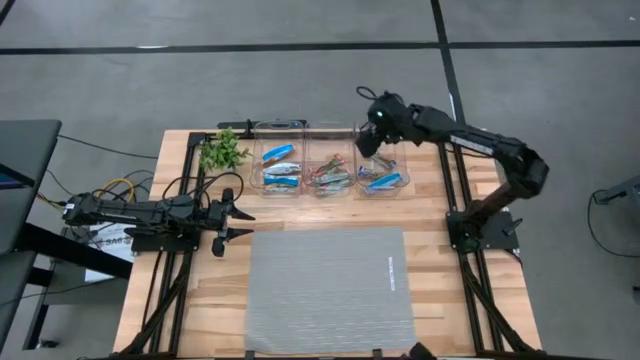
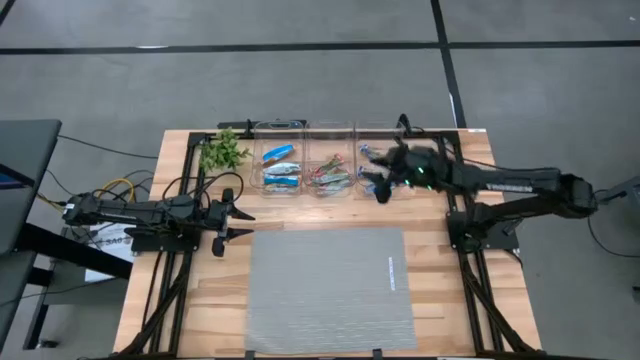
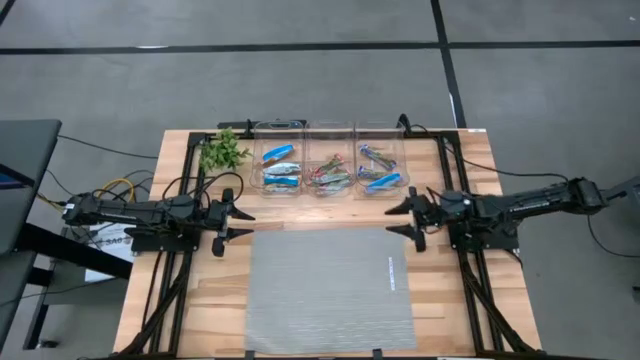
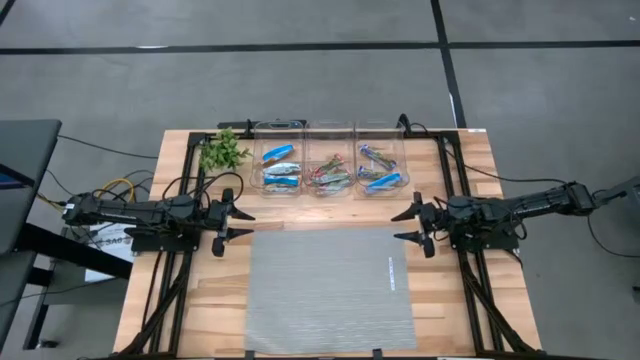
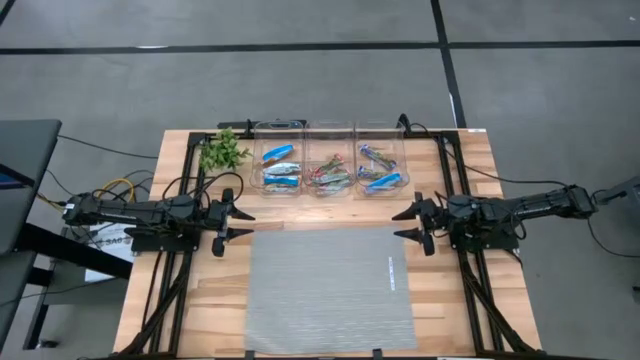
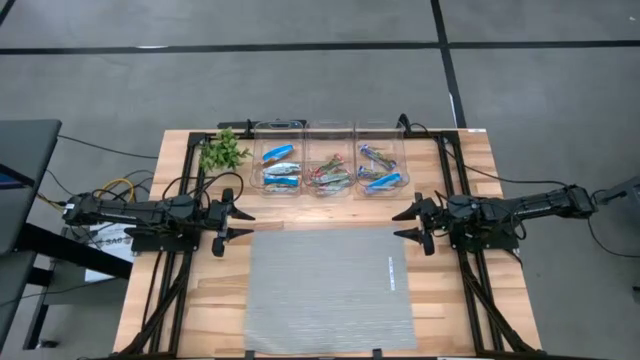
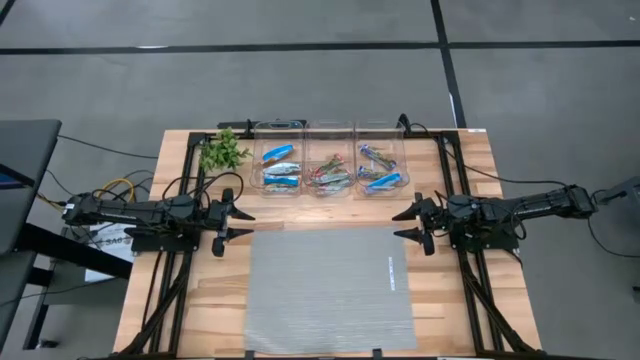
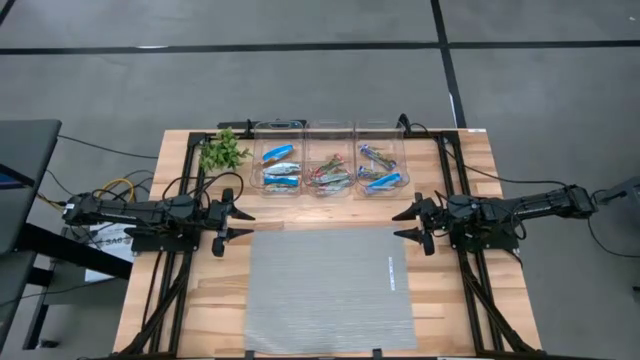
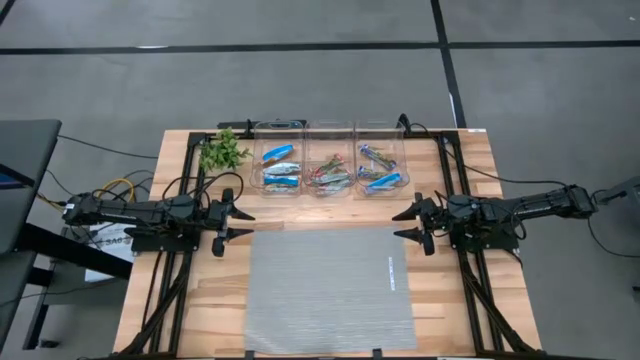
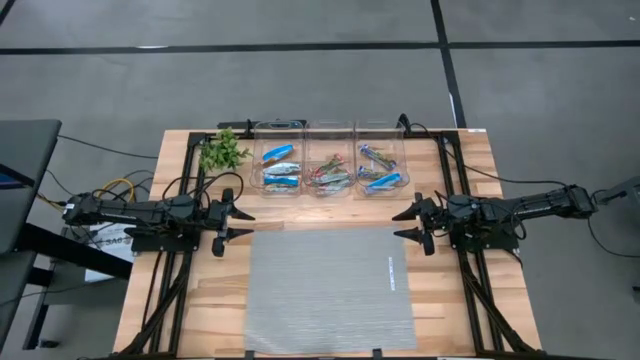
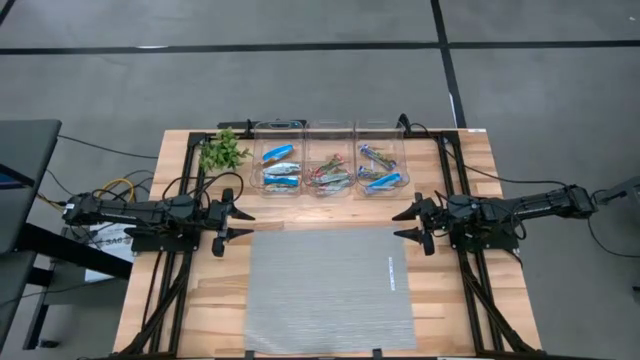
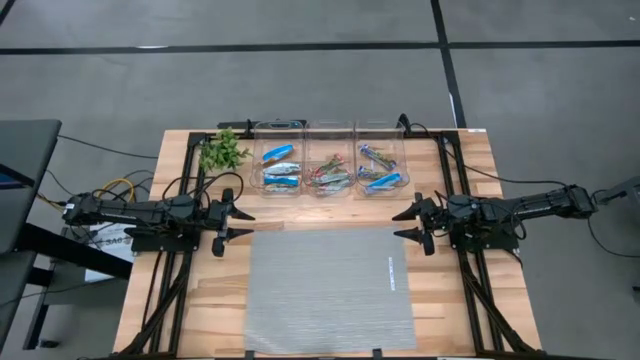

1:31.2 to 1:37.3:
Task: Pick and place Granola Bars by type
Return to Home Position

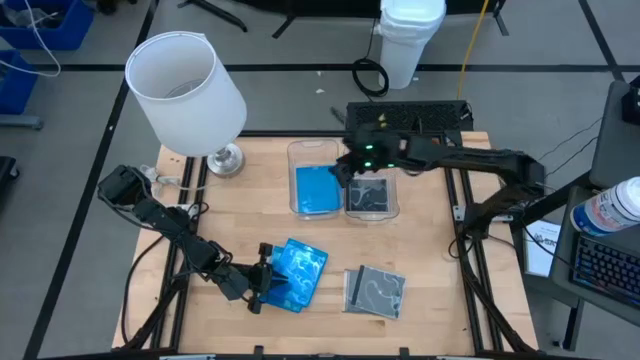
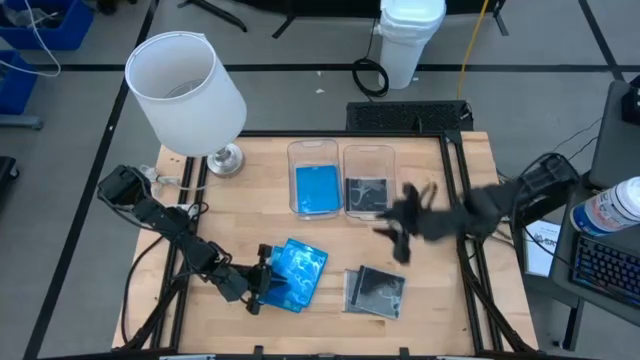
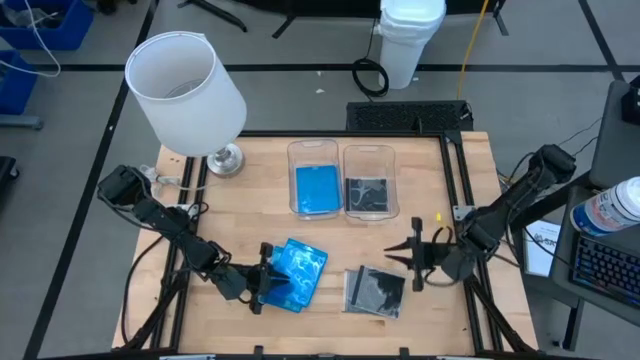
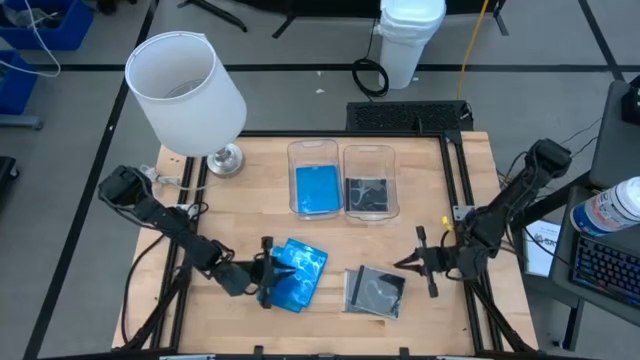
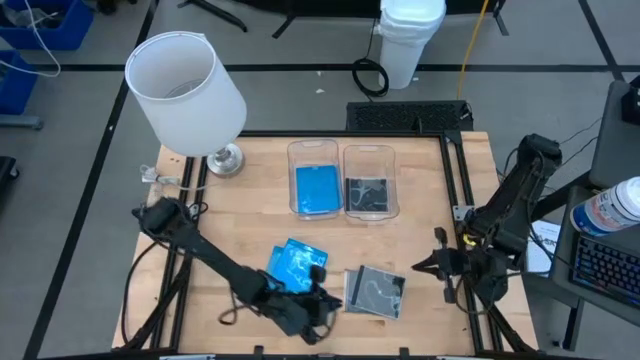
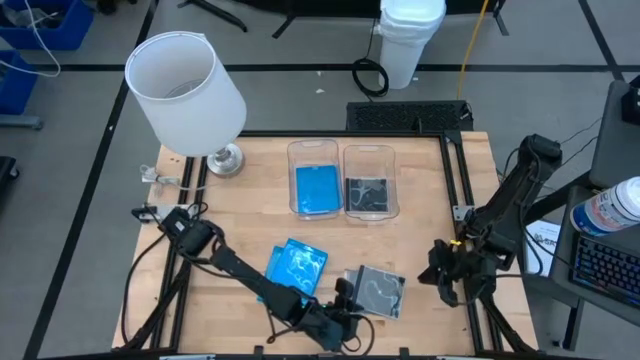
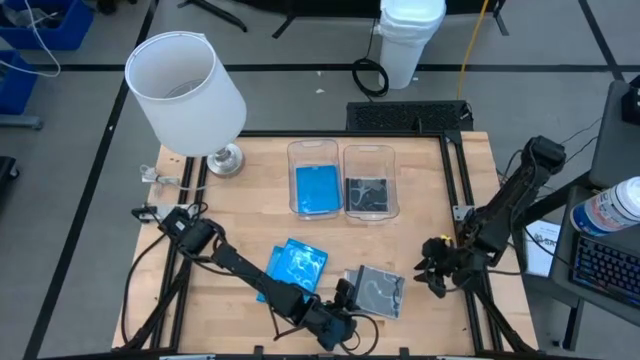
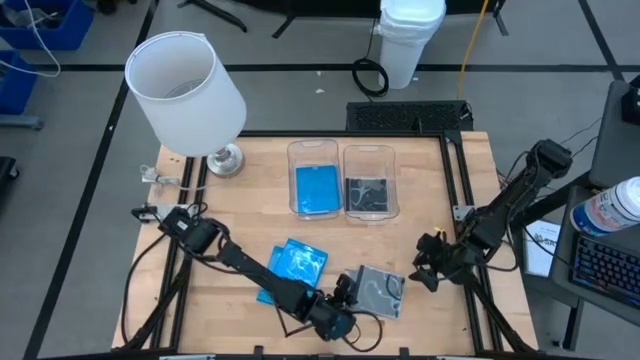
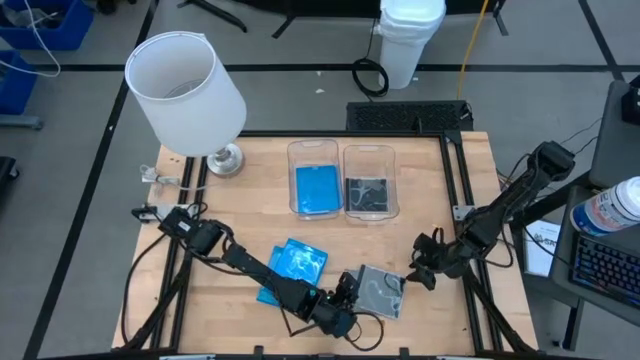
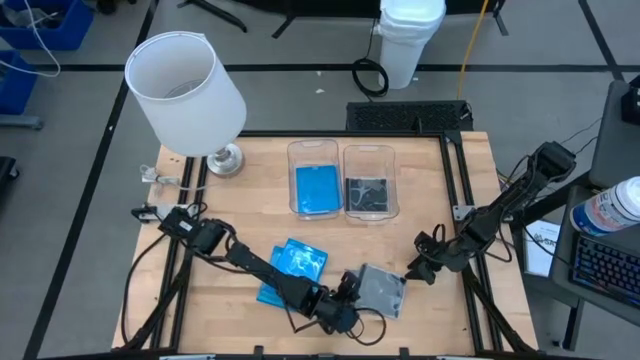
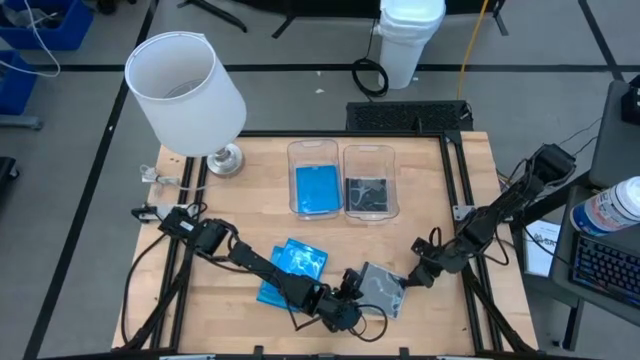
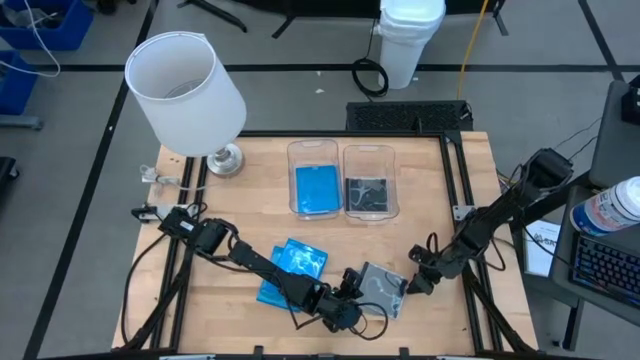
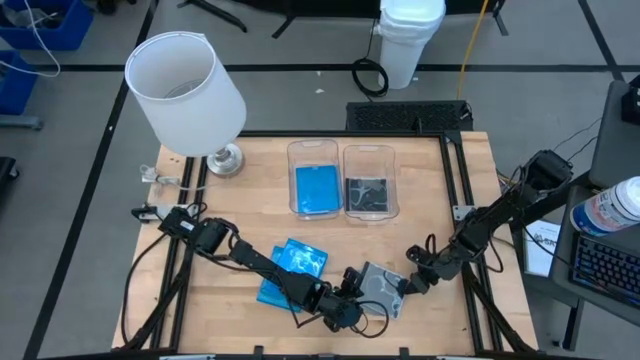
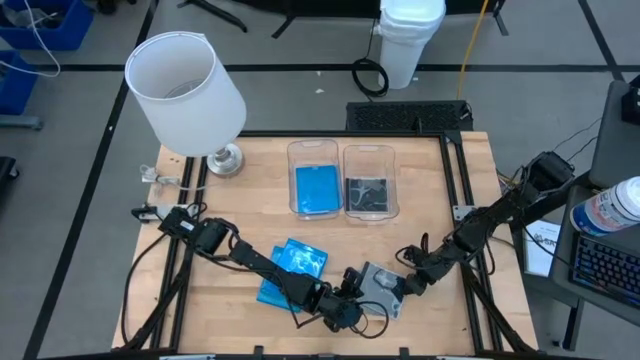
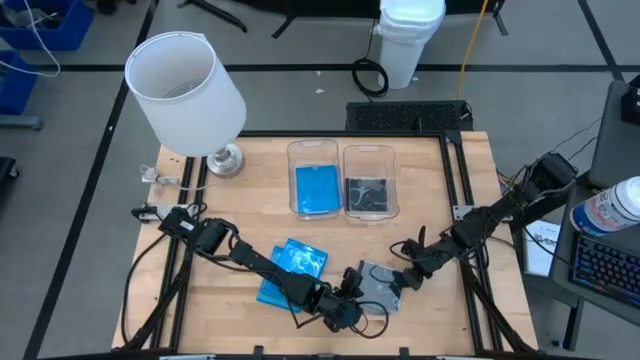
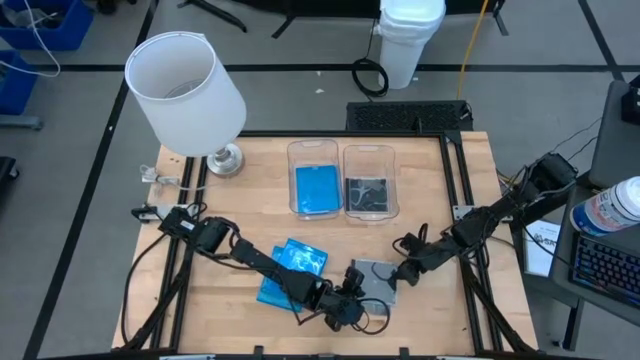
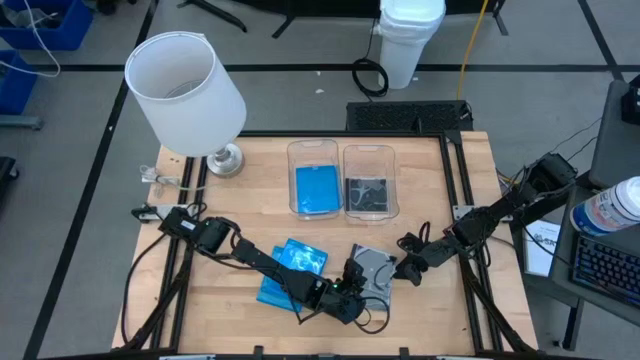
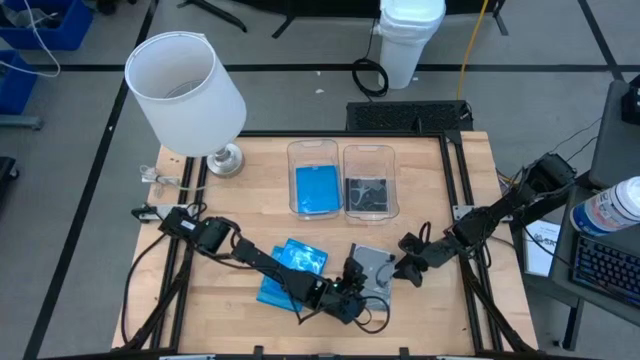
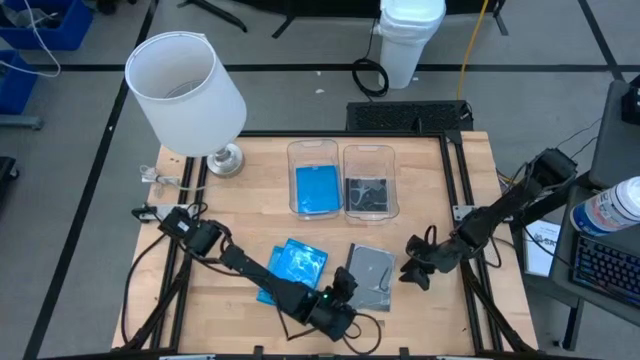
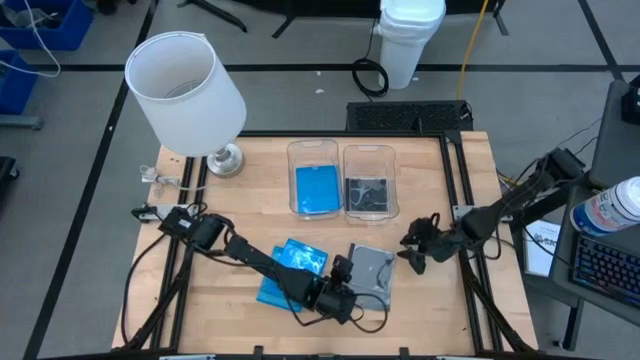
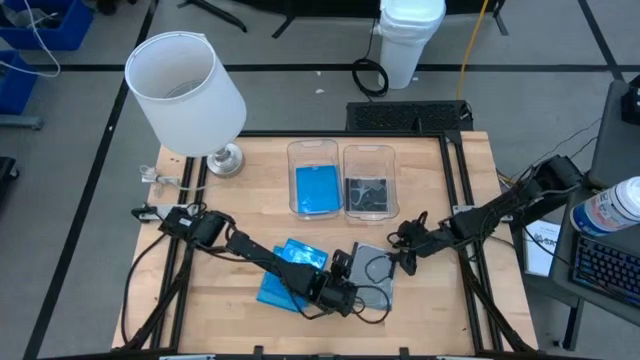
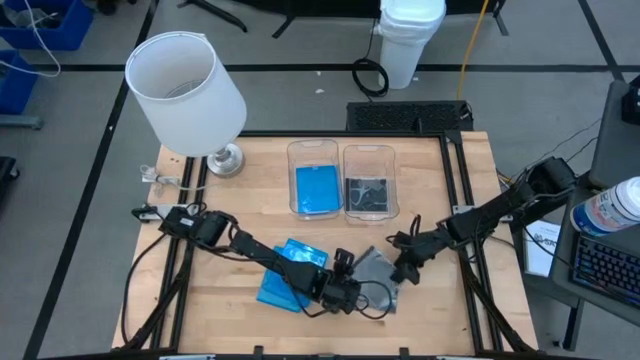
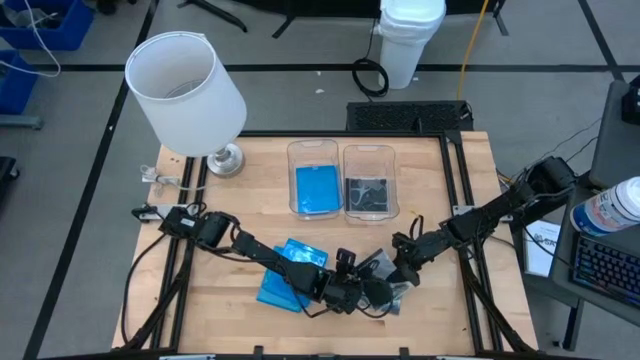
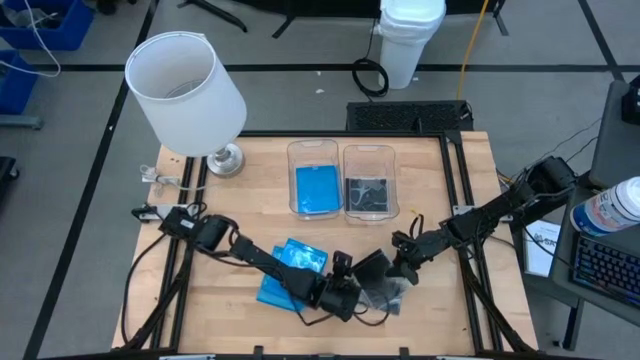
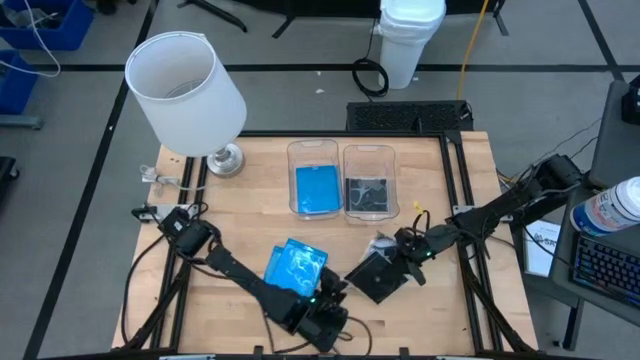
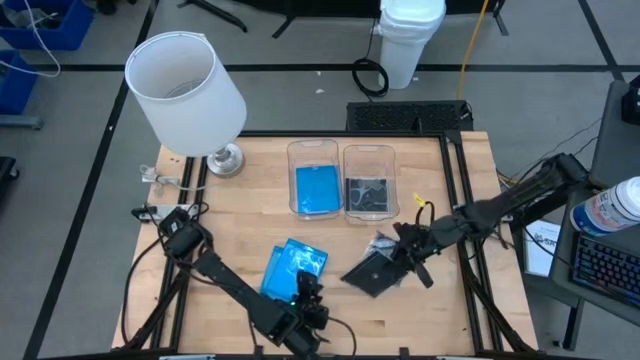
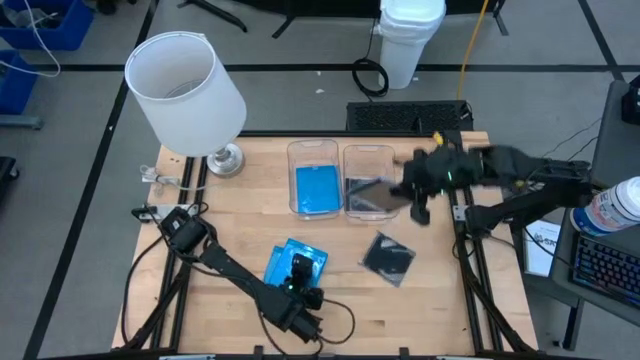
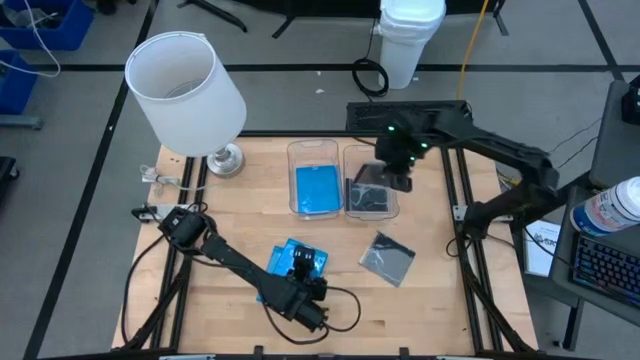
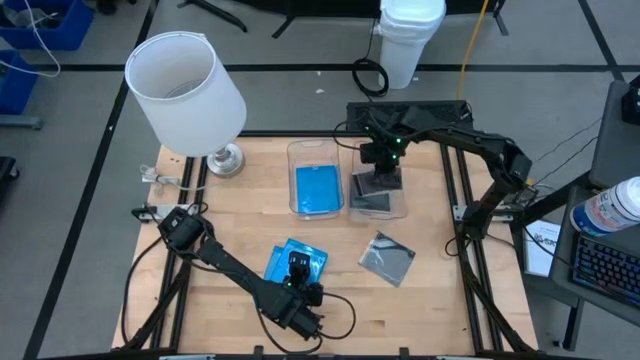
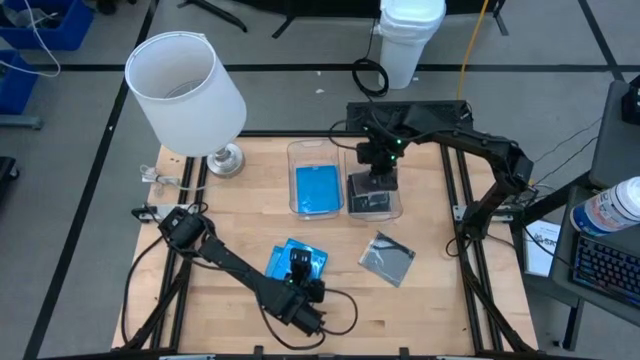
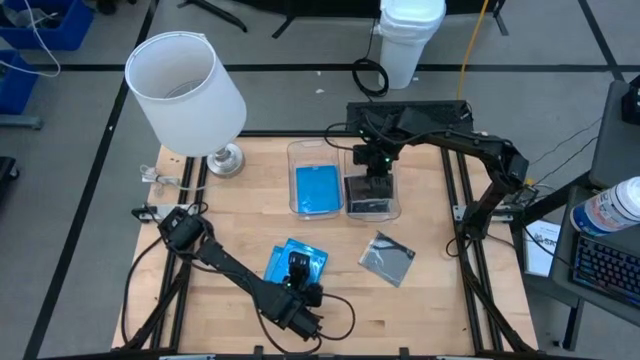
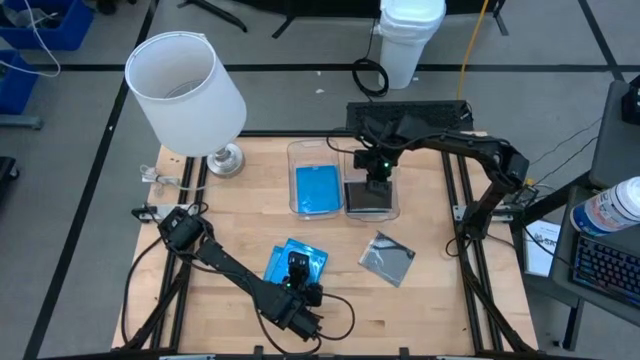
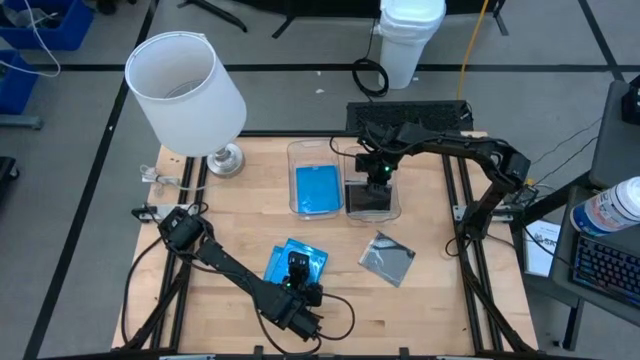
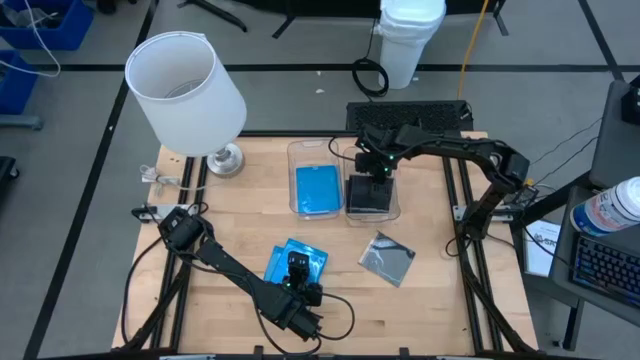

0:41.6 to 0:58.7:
Task: Pick & place jewel cases by type
Stack the top black CD case on top of the black CD case in the right transparent bin
